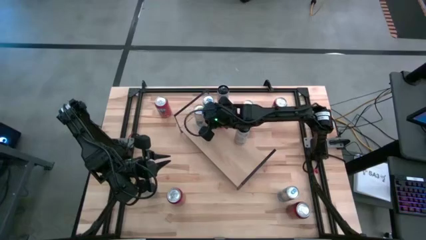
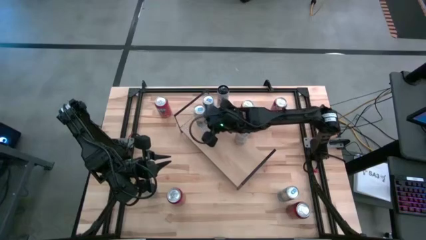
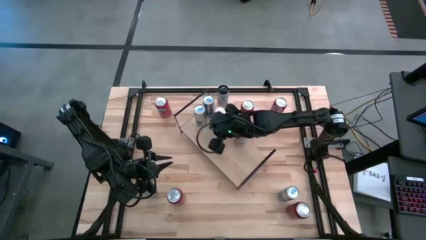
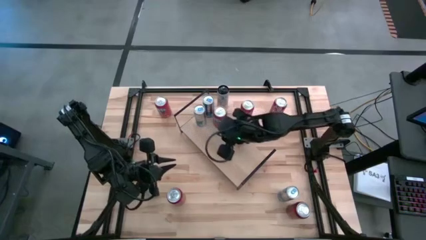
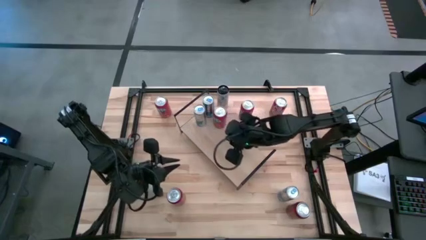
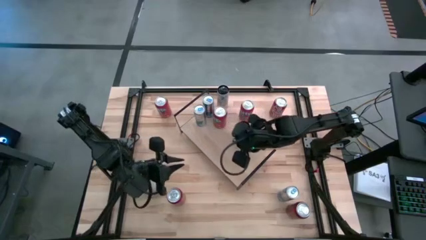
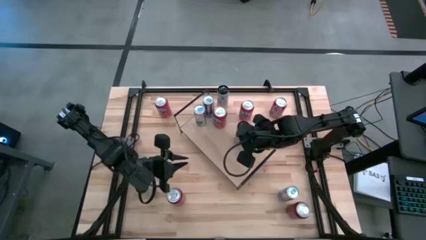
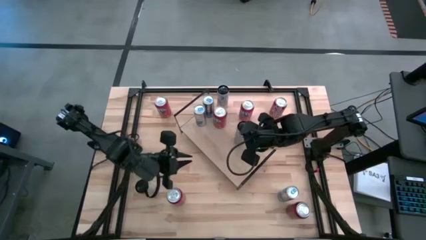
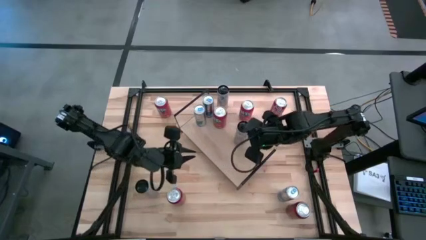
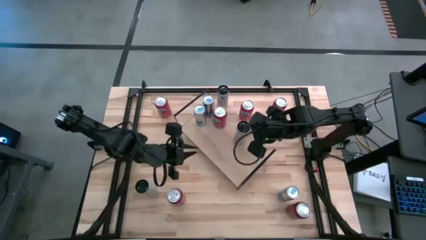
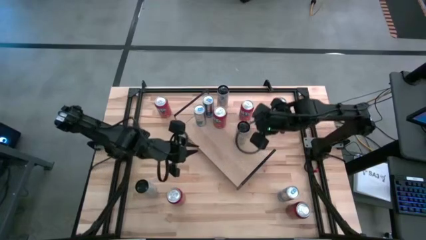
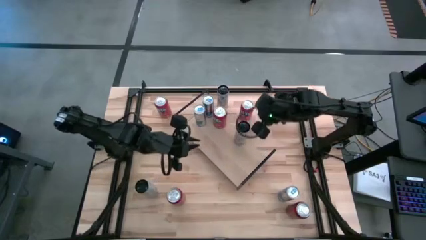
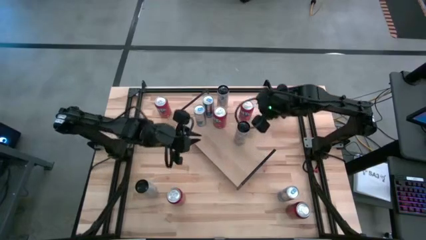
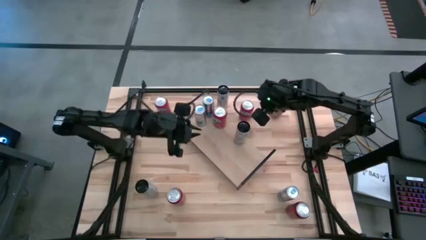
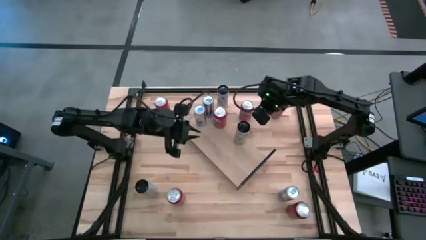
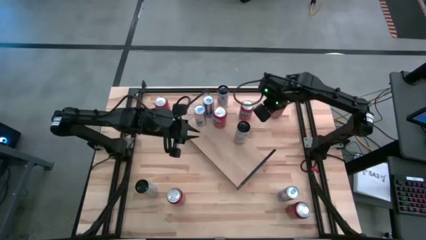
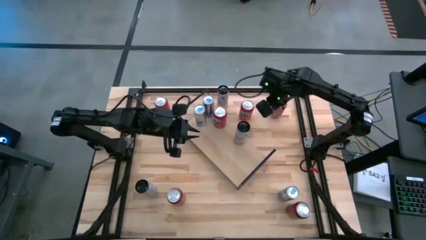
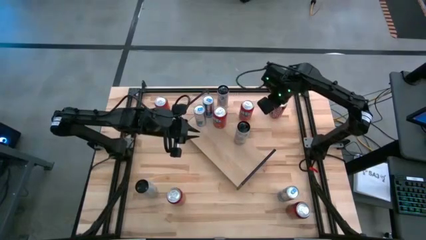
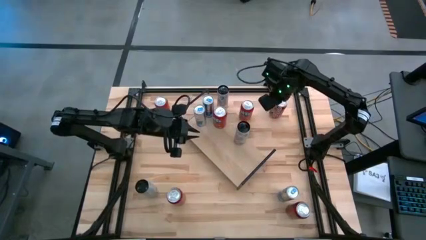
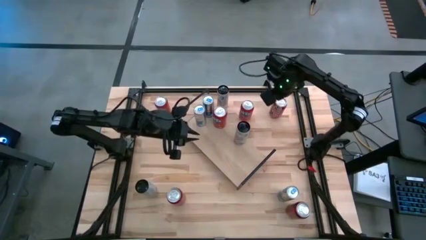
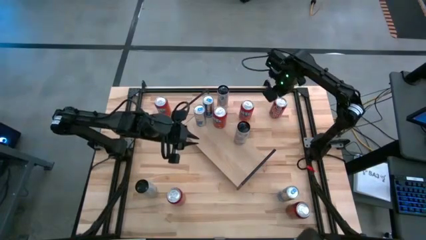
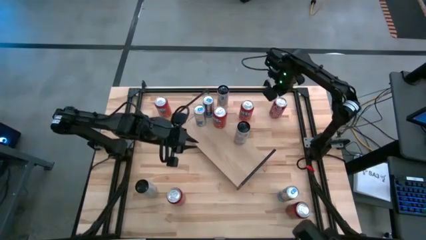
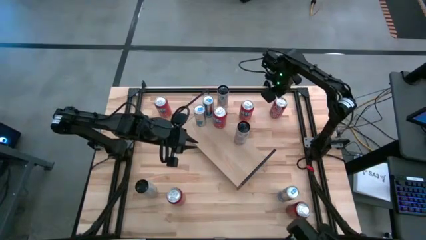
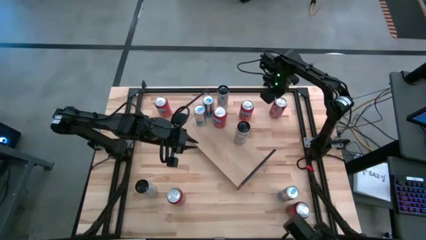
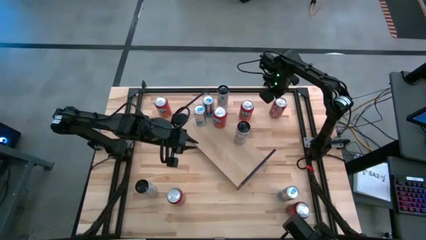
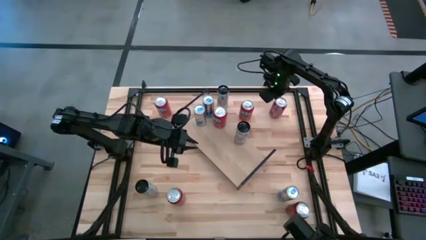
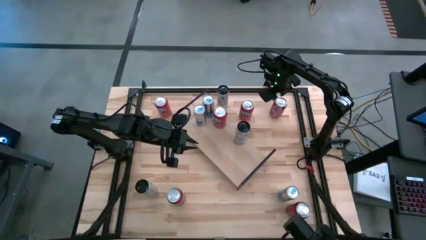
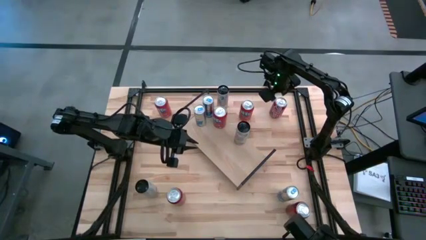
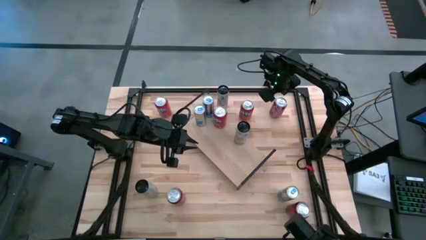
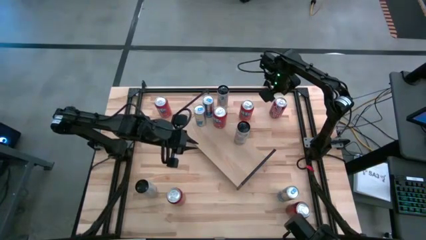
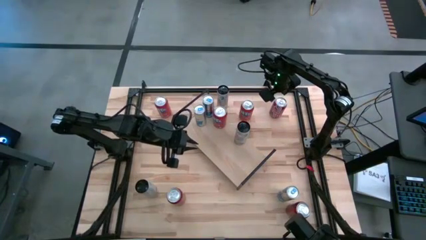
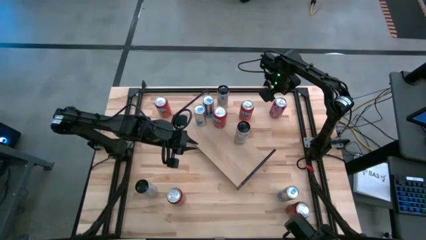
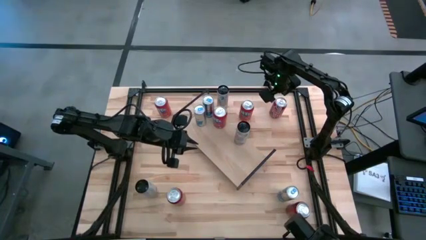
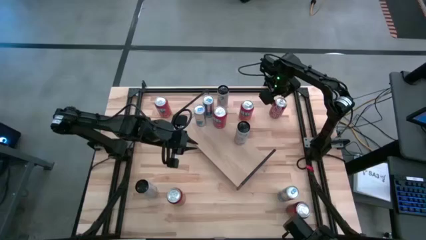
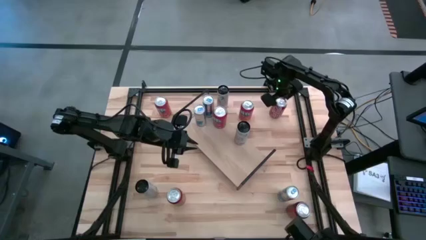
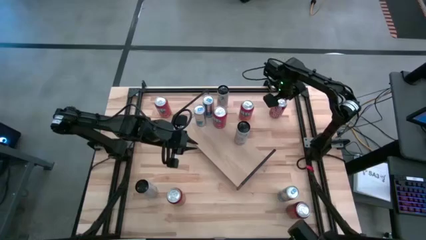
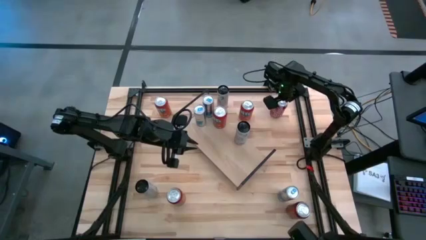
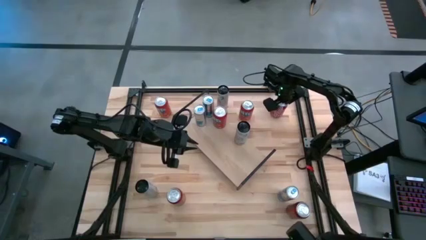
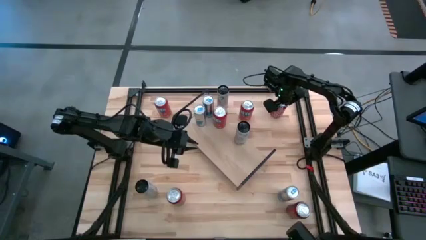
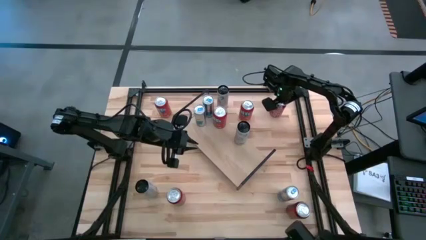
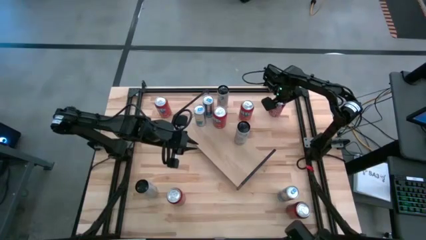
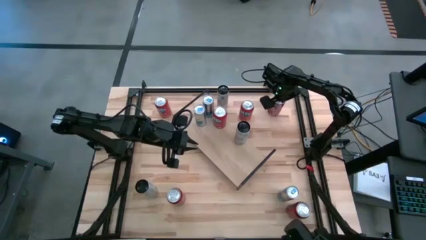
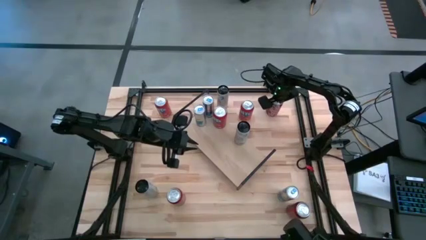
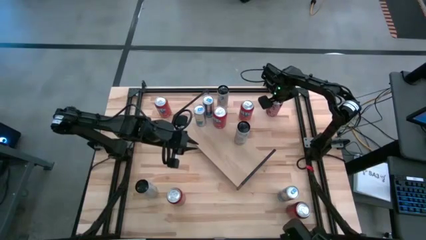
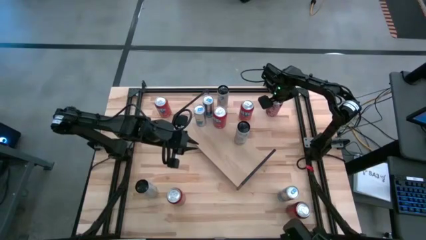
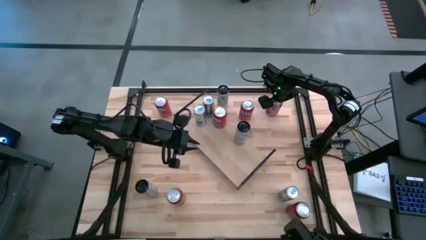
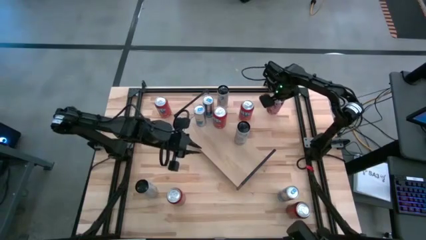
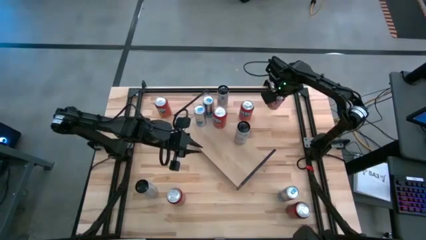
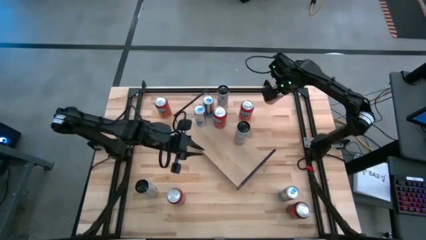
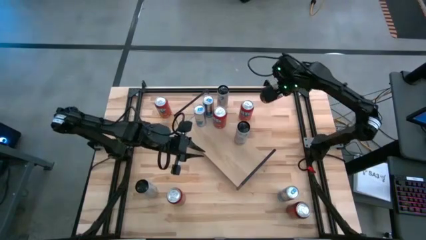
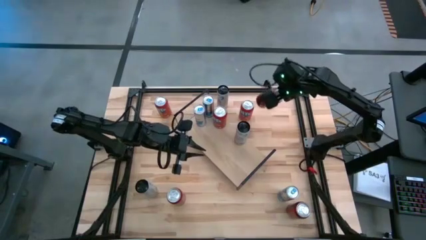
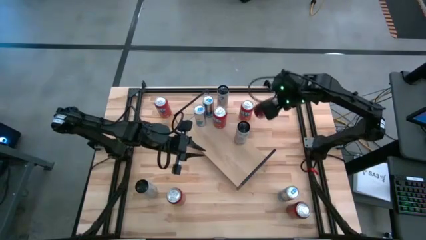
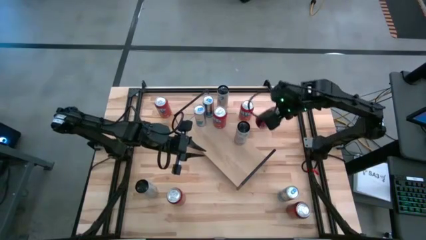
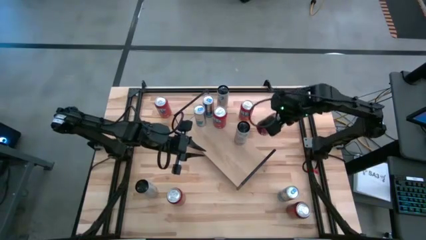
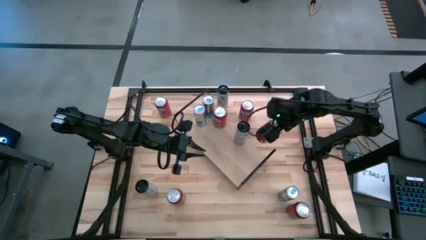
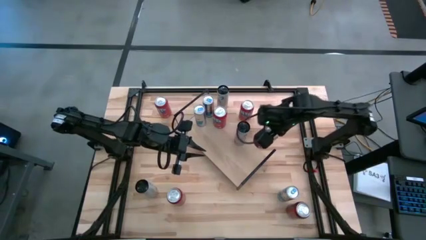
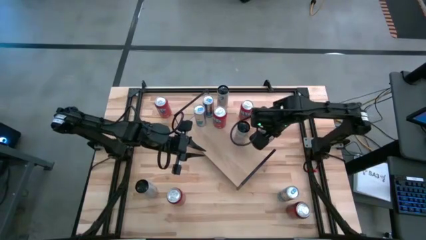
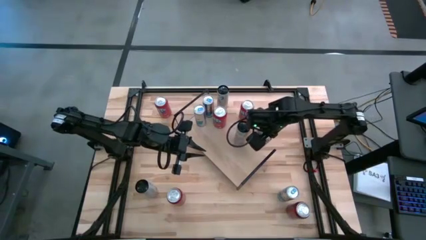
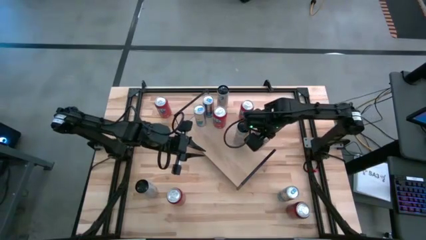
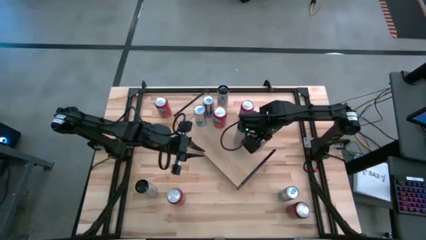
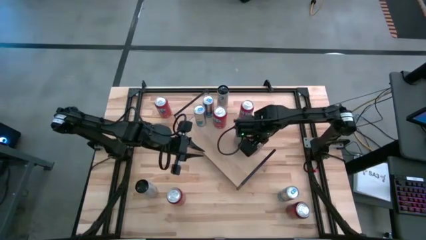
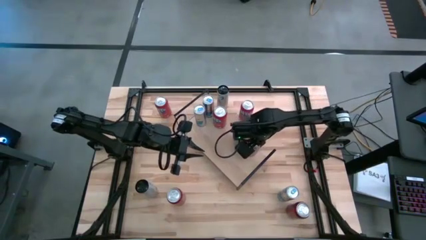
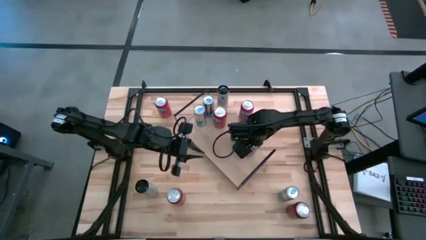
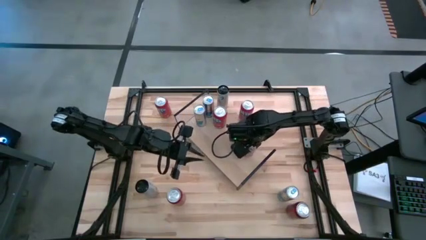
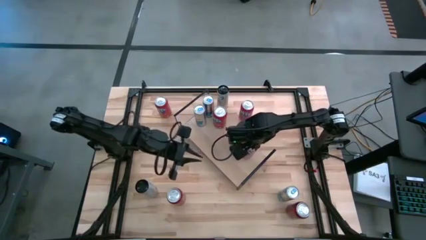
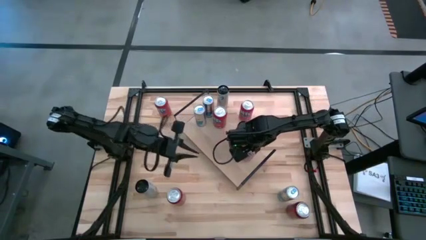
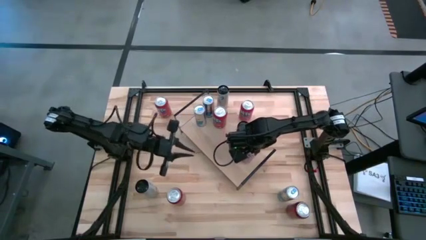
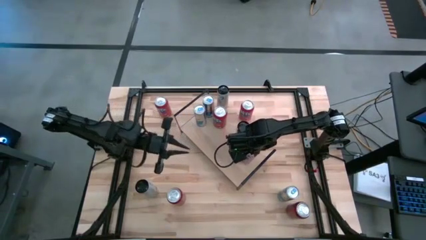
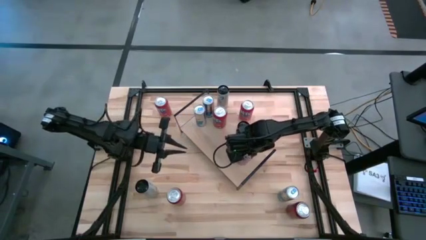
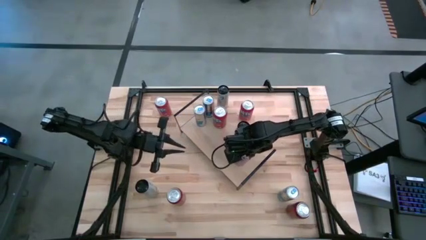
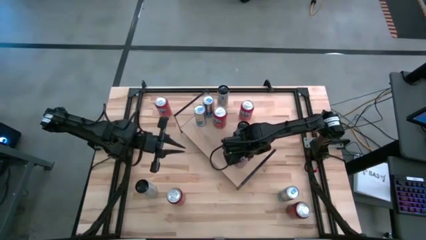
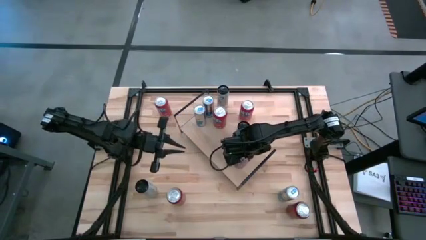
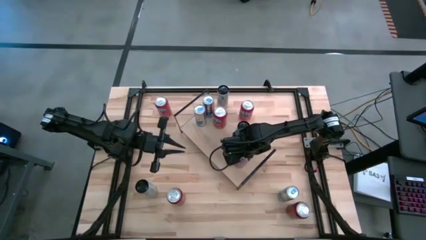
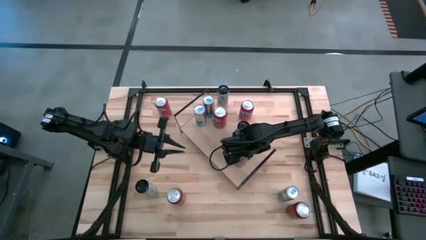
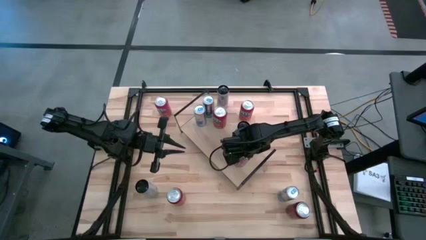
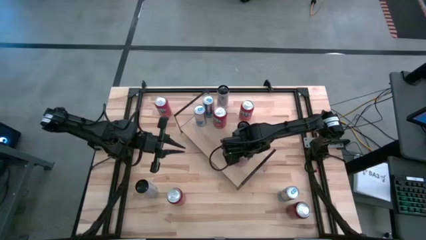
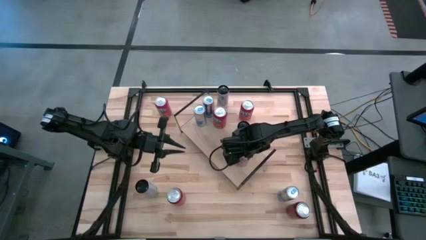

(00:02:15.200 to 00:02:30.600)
Task: Place canned beverage on shelf
Put the red soda can on the shelf
